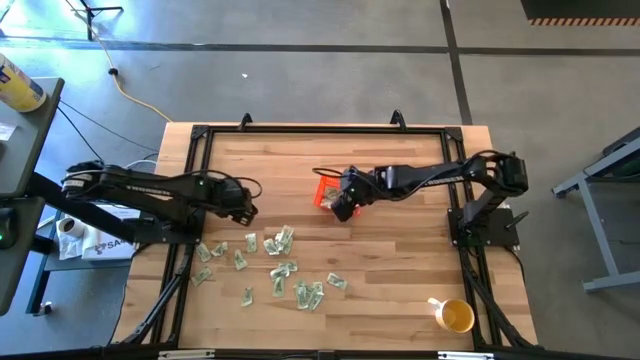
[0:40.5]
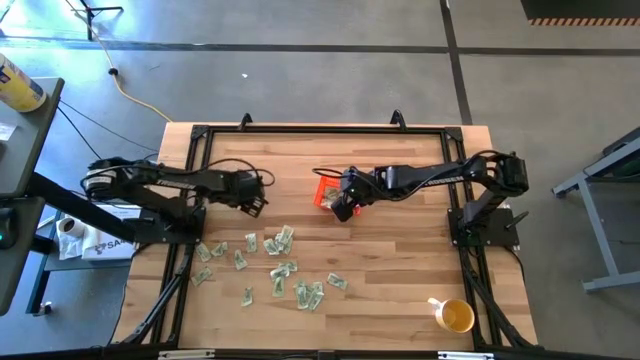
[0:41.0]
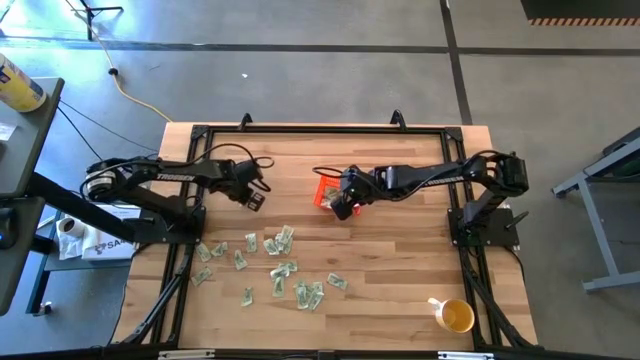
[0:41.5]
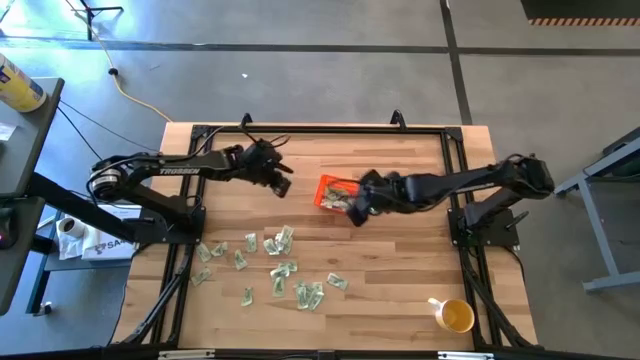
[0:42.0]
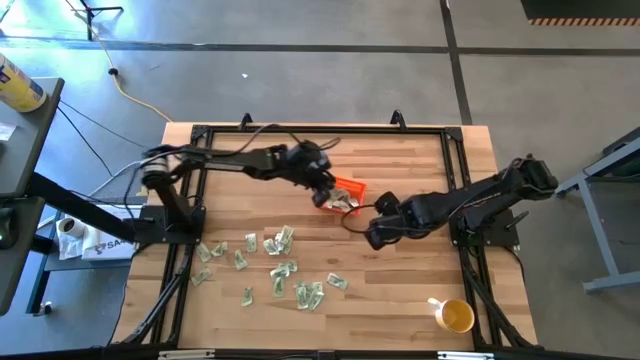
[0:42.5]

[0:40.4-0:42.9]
Task: Pick and place Stevia / Truvia into bins
Put the green stevia packet into the orange basket

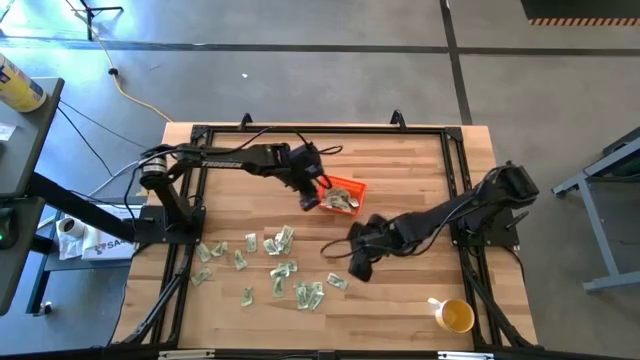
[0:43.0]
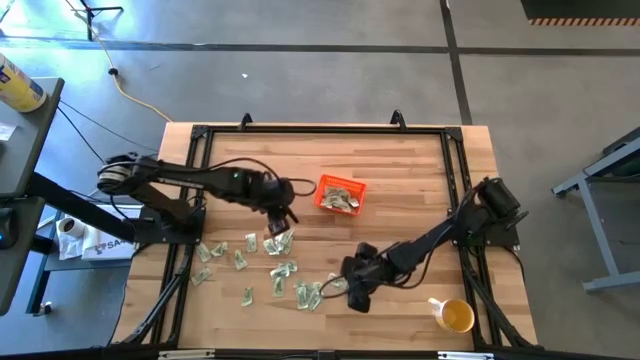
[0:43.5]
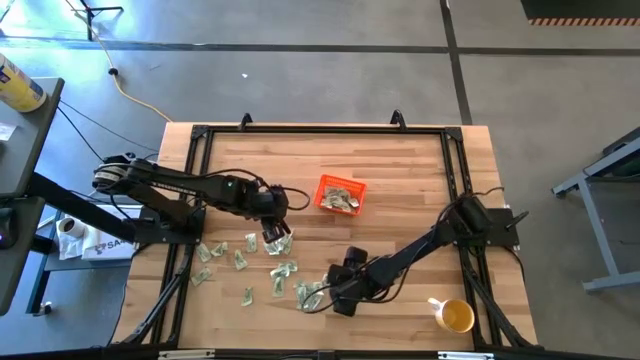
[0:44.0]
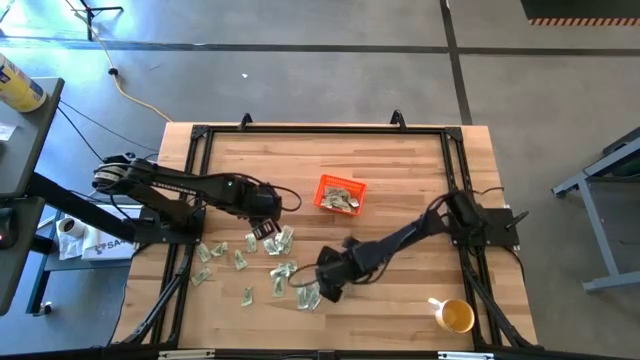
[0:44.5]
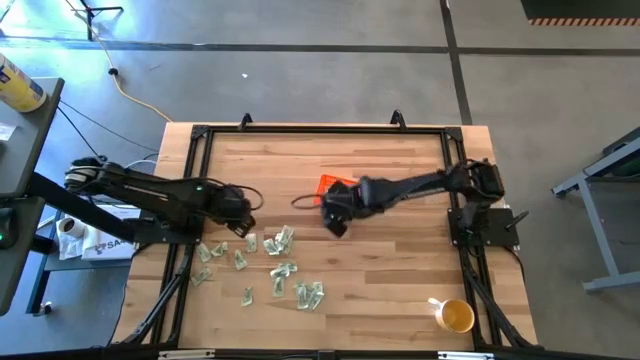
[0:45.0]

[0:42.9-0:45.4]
Put the green stevia packet into the orange basket

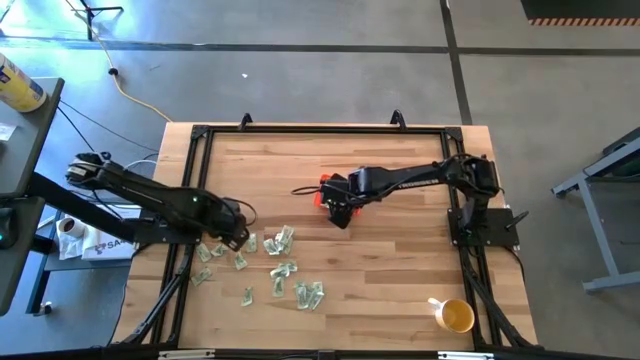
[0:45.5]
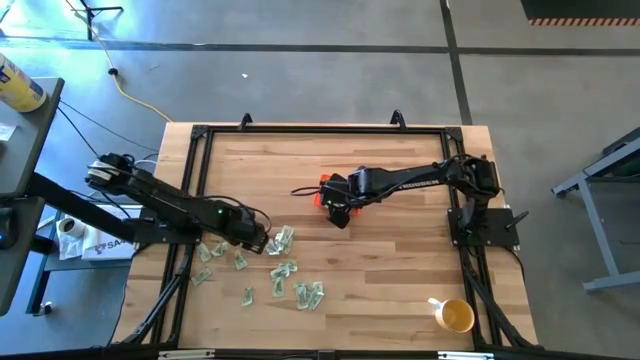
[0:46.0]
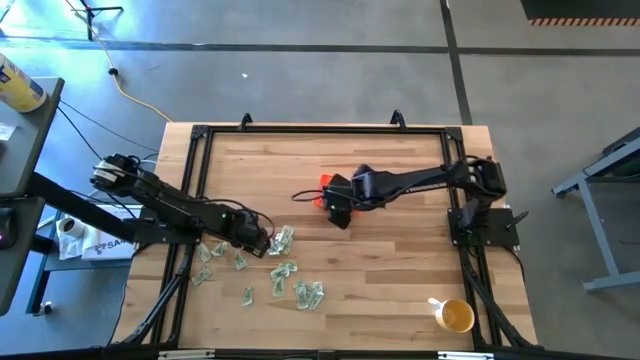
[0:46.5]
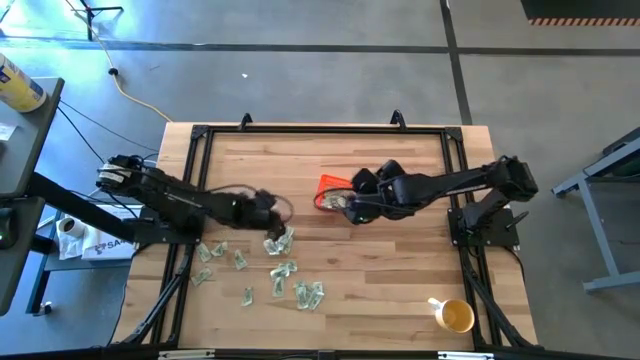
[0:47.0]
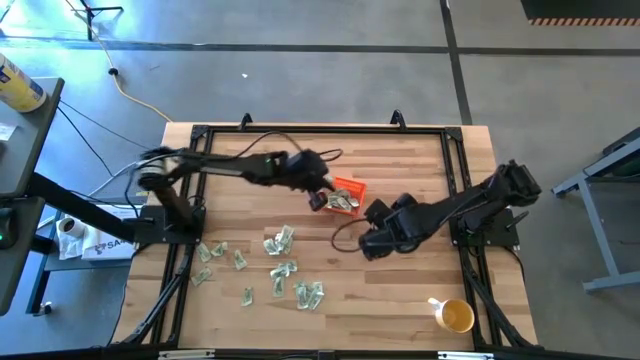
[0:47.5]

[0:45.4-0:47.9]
Put the green stevia packet into the orange basket

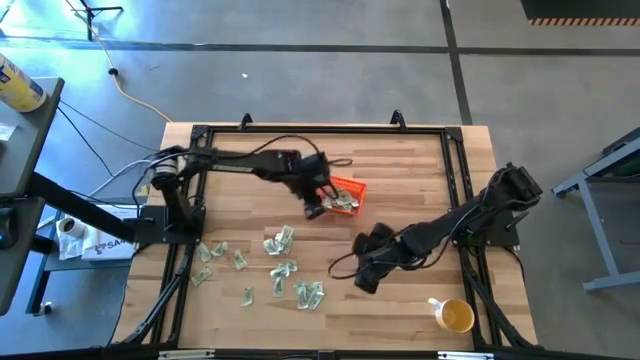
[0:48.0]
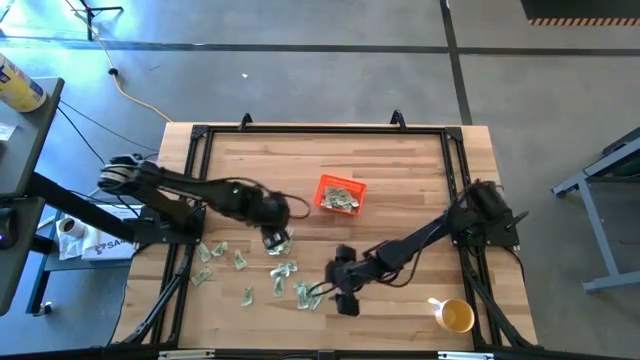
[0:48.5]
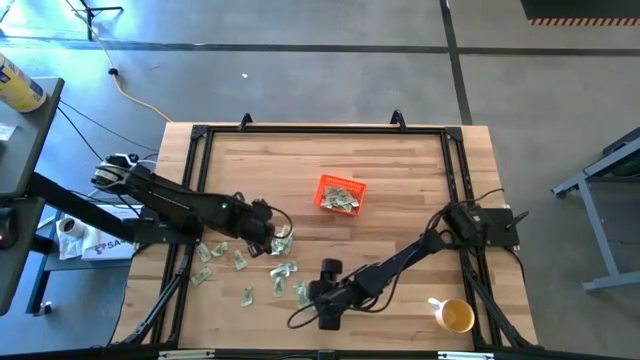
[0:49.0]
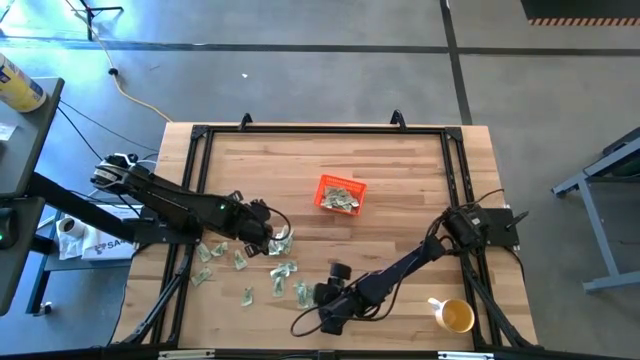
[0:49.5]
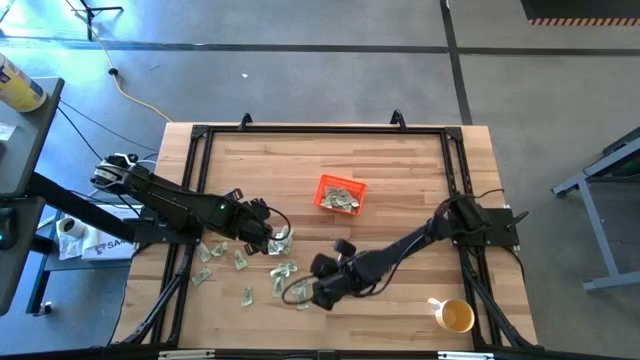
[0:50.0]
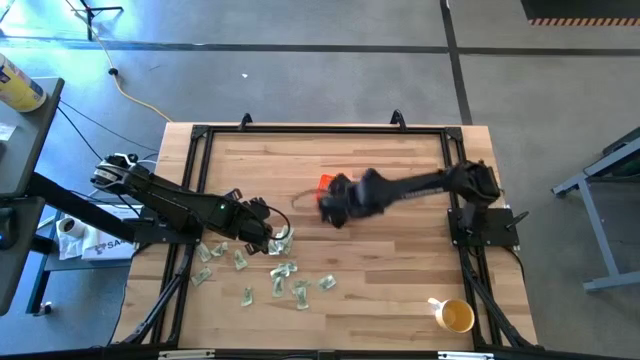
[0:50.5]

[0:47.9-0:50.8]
Put the green stevia packet into the orange basket

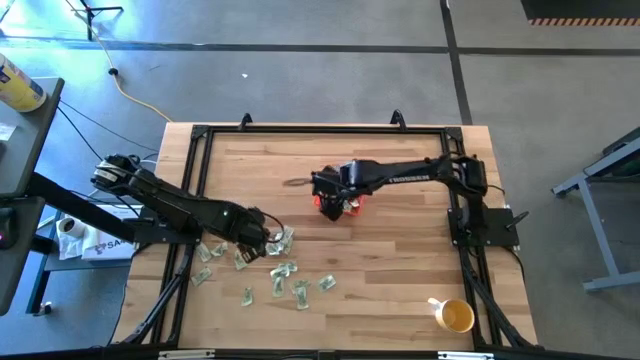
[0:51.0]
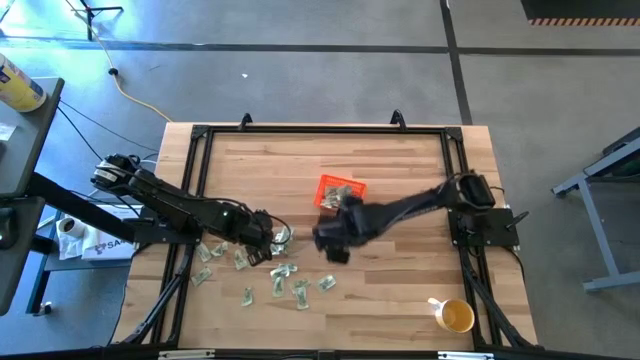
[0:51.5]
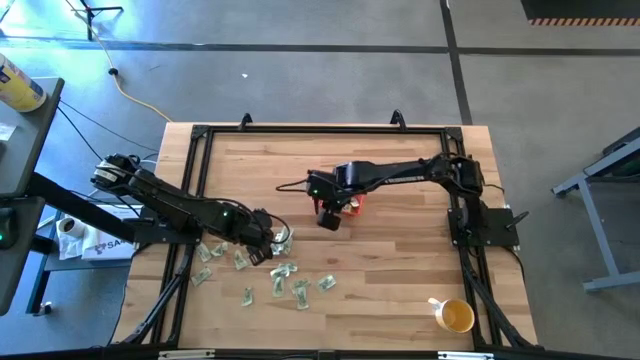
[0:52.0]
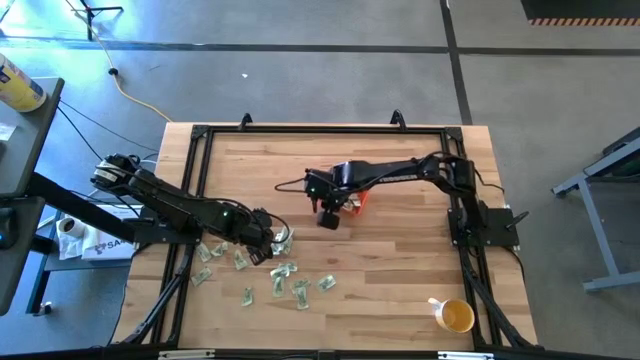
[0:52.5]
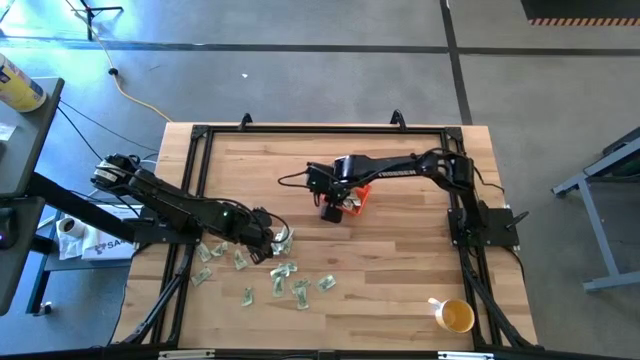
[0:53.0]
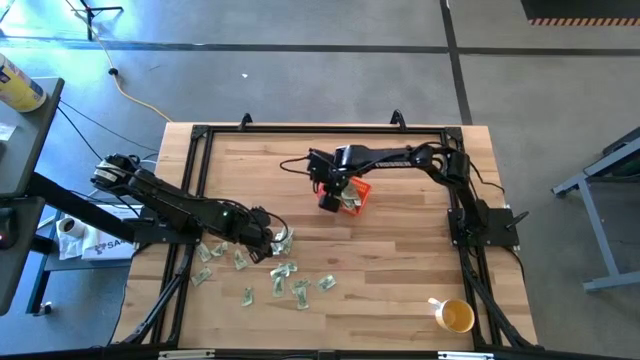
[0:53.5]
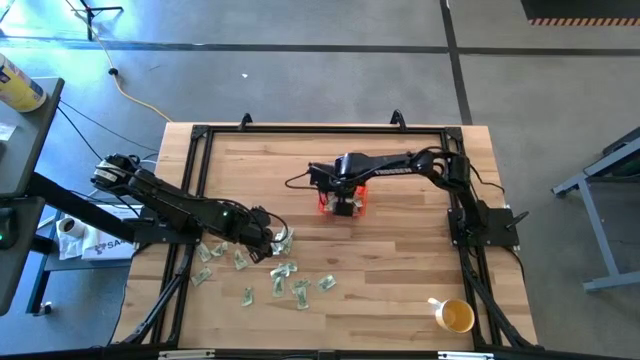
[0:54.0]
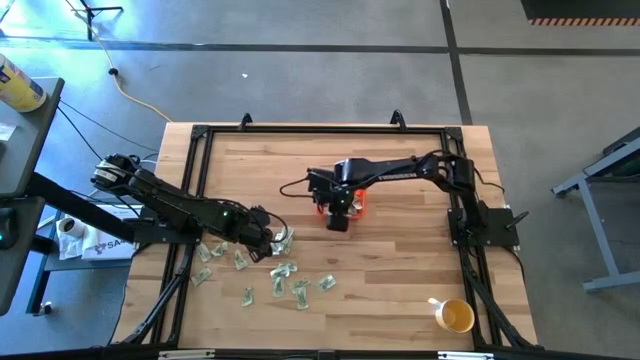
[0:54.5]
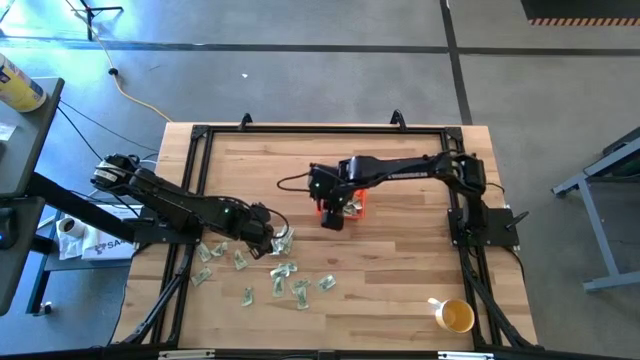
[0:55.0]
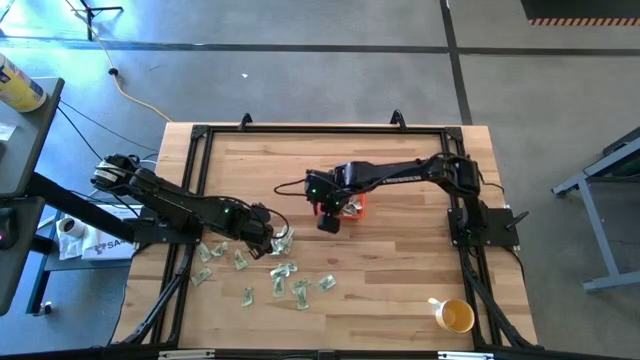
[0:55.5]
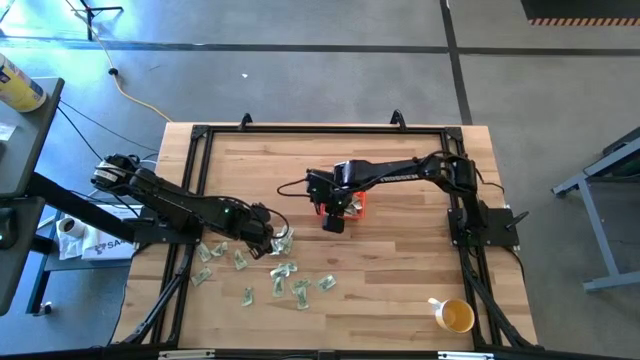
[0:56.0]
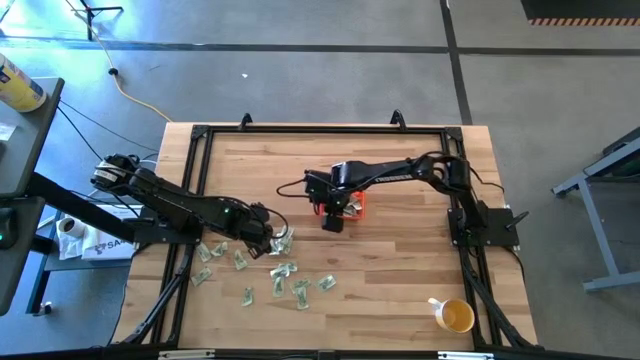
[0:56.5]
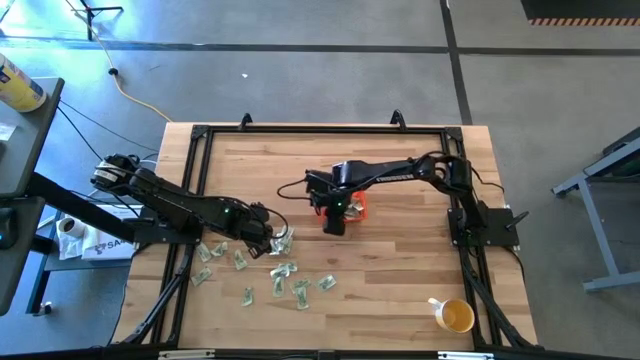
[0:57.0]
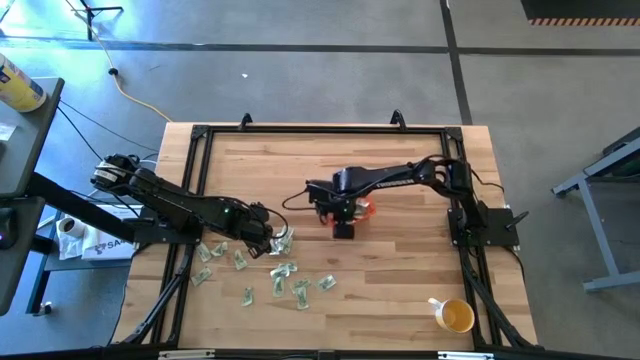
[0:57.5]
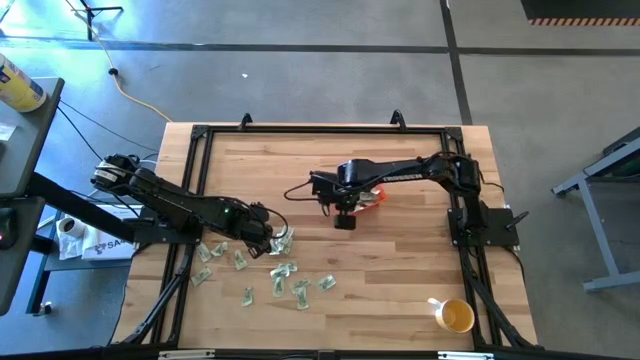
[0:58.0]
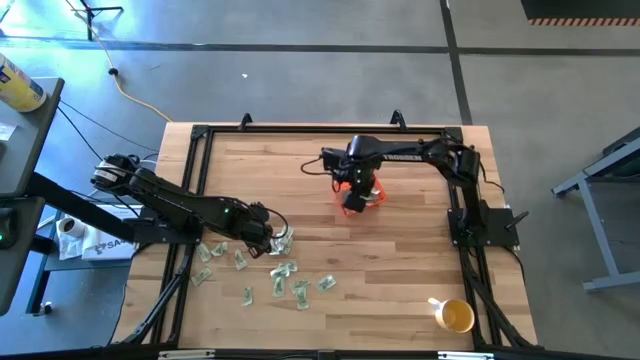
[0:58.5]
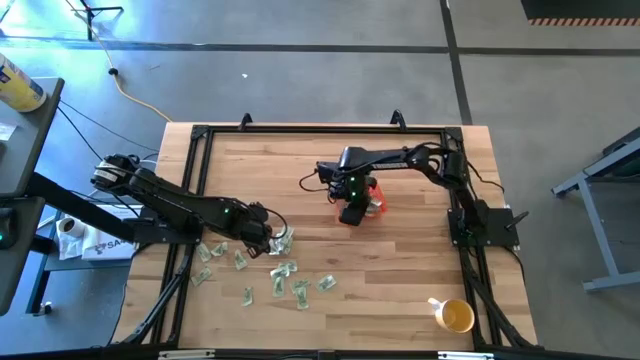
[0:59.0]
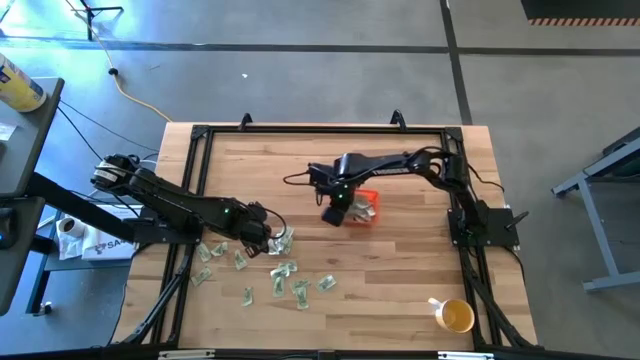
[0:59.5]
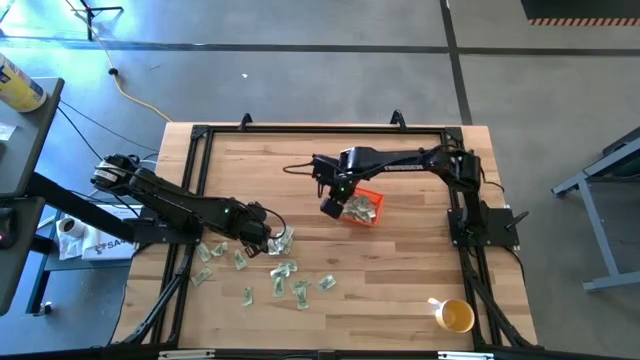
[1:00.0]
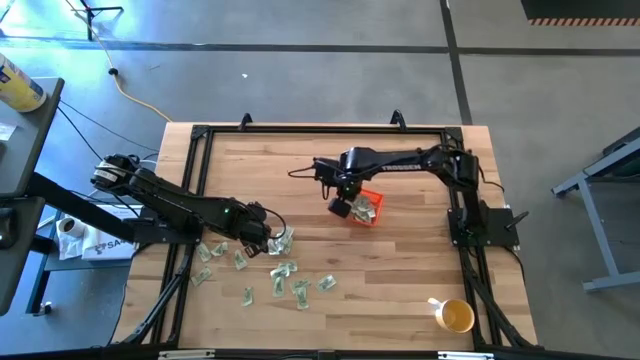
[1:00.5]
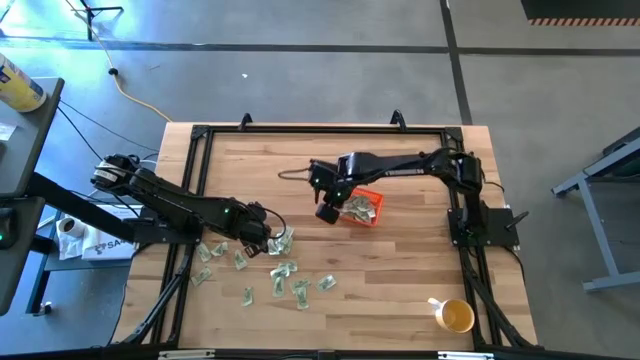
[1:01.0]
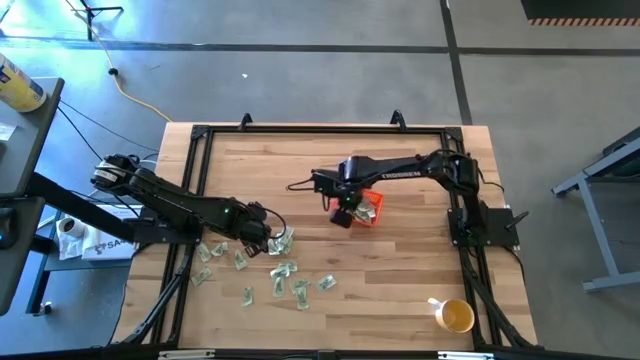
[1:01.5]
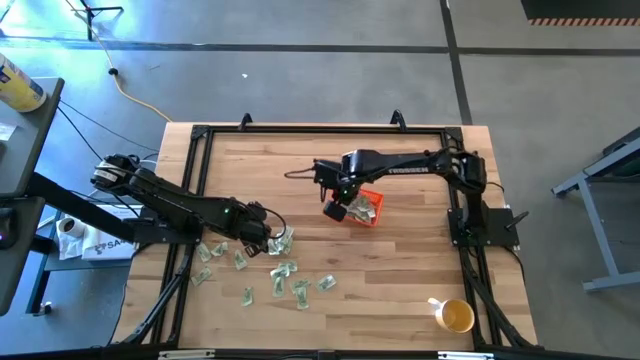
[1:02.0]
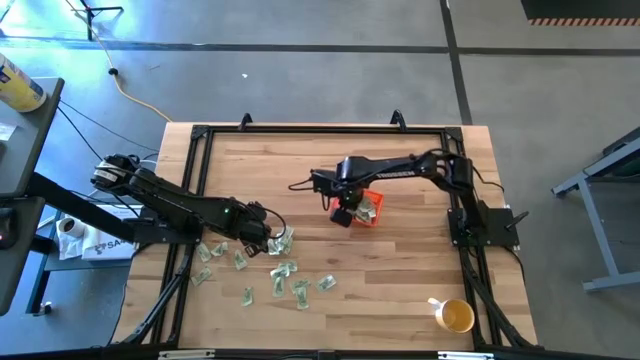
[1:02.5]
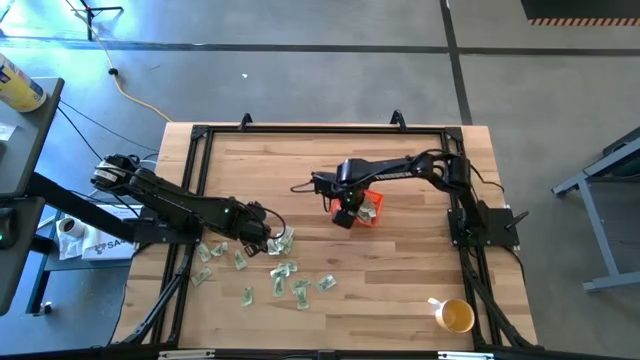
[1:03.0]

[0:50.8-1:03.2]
Adjust the green stevia packets in the orange basket
